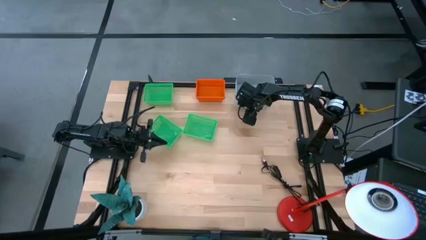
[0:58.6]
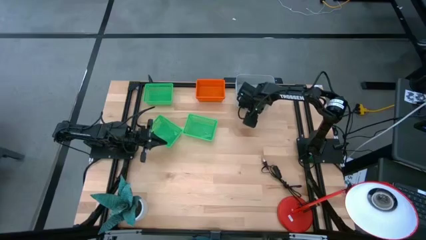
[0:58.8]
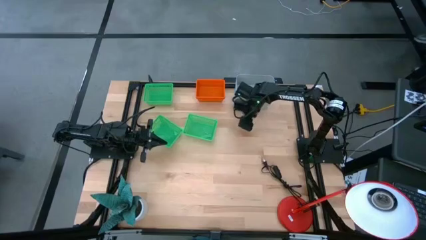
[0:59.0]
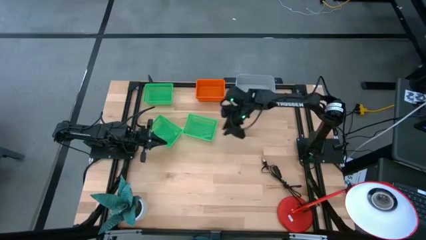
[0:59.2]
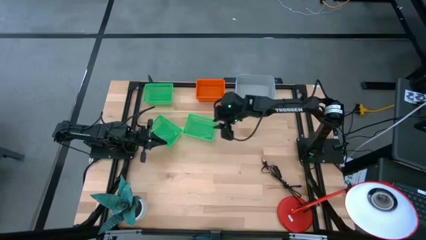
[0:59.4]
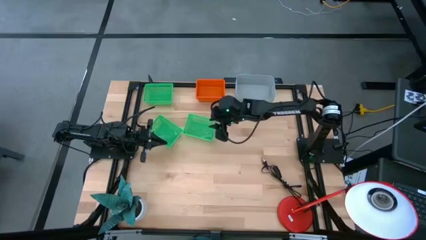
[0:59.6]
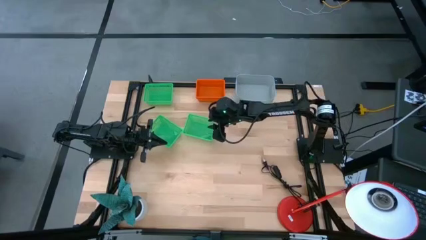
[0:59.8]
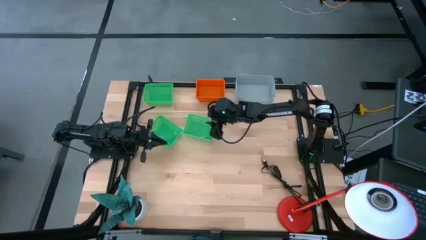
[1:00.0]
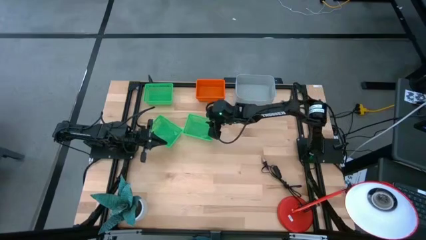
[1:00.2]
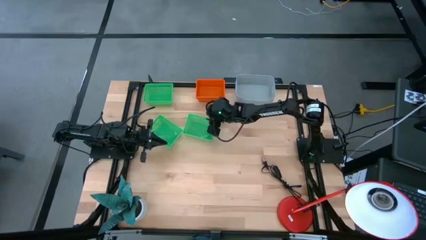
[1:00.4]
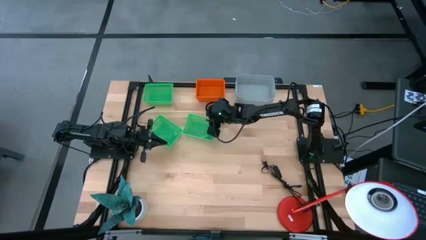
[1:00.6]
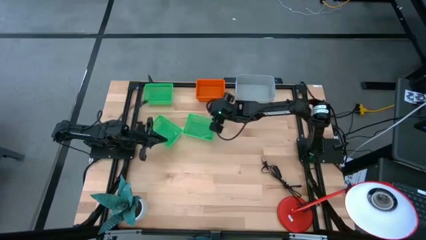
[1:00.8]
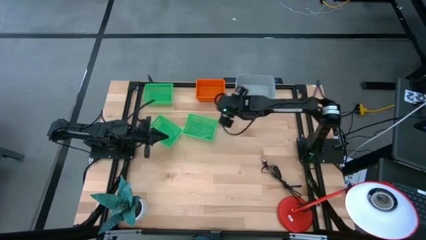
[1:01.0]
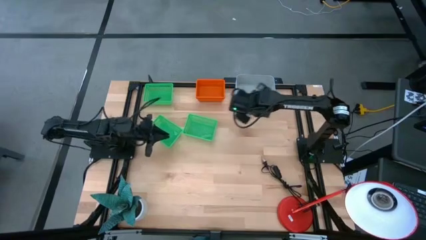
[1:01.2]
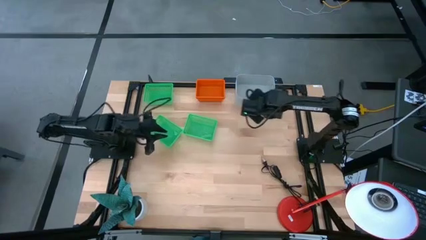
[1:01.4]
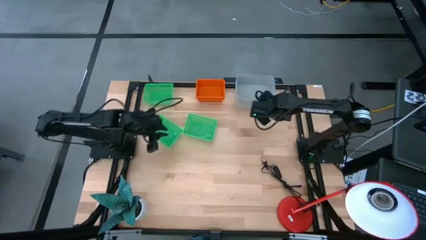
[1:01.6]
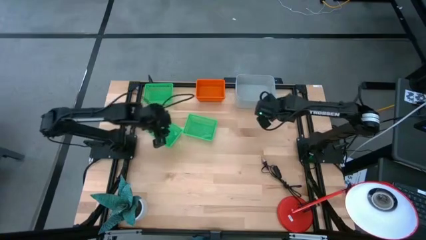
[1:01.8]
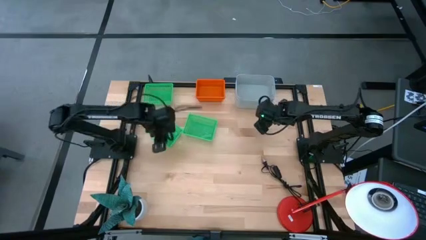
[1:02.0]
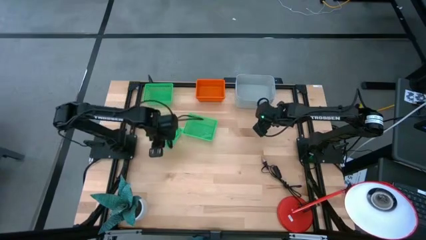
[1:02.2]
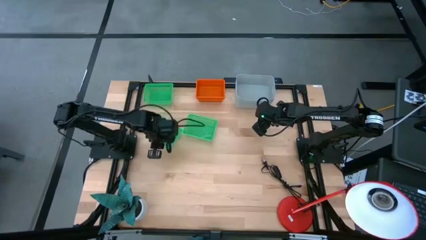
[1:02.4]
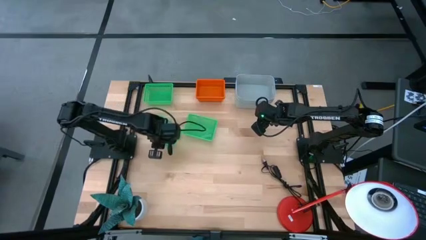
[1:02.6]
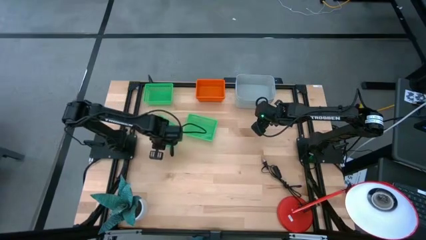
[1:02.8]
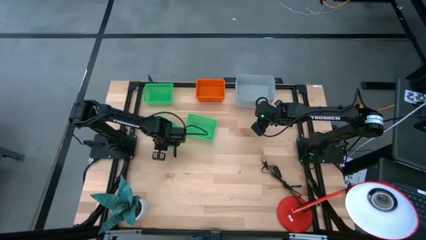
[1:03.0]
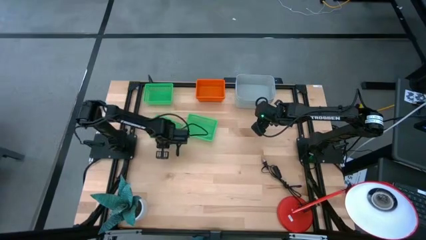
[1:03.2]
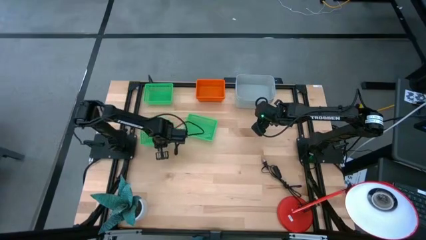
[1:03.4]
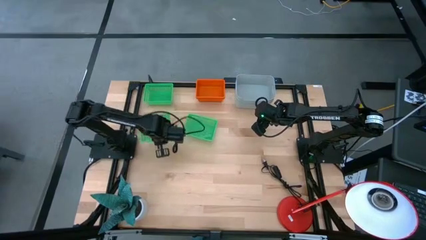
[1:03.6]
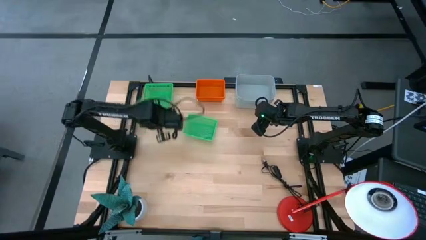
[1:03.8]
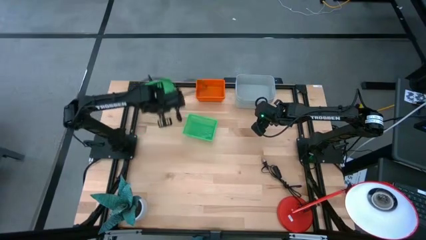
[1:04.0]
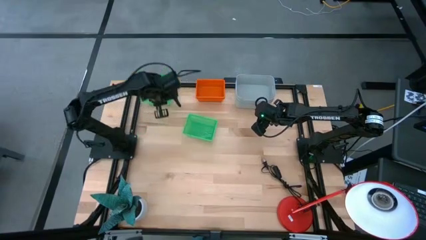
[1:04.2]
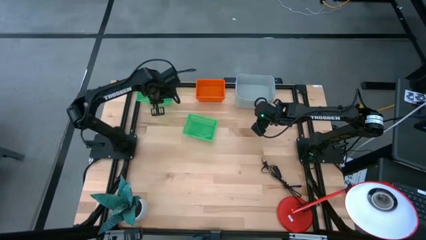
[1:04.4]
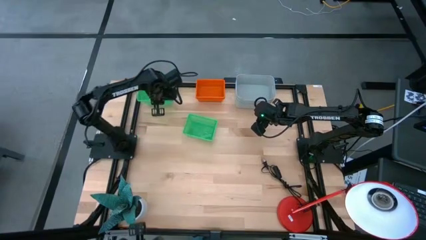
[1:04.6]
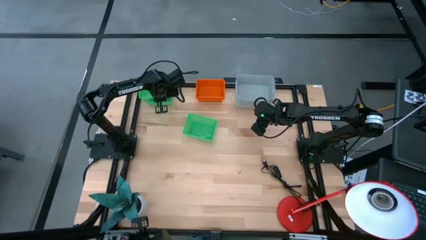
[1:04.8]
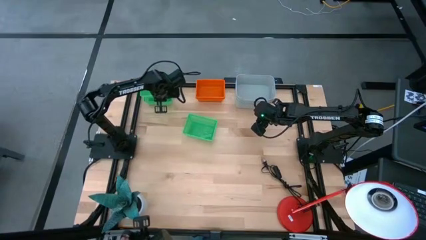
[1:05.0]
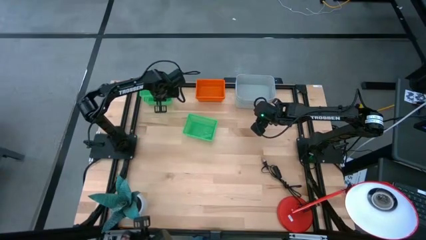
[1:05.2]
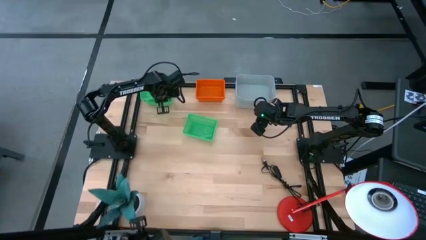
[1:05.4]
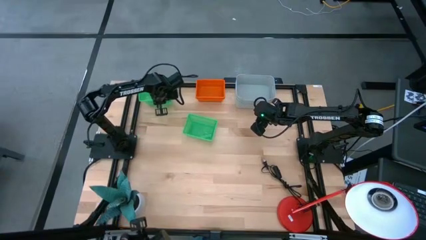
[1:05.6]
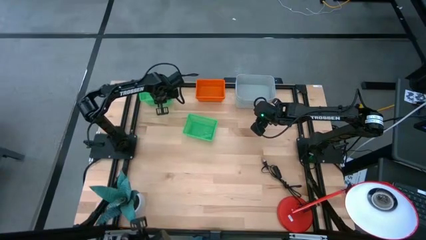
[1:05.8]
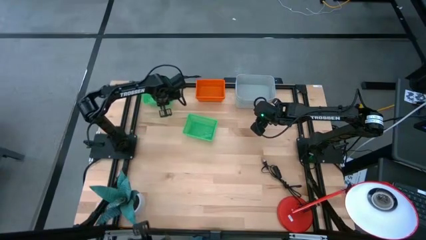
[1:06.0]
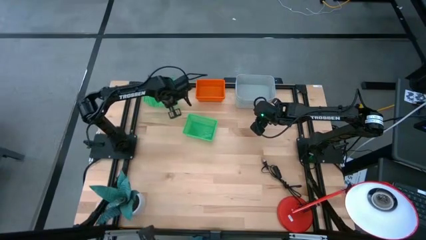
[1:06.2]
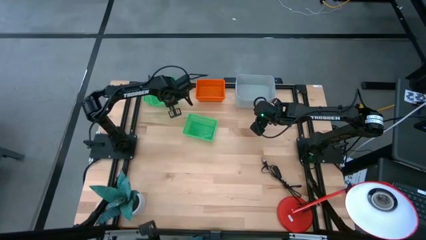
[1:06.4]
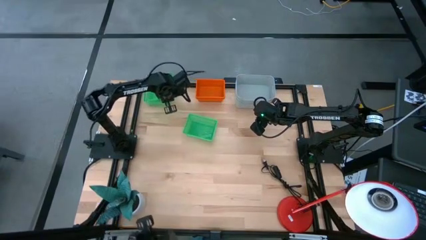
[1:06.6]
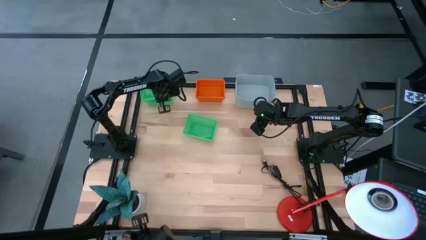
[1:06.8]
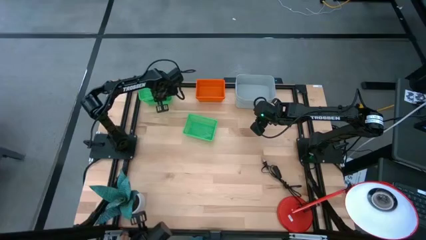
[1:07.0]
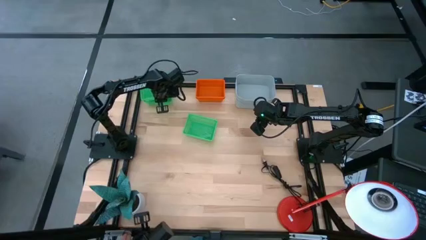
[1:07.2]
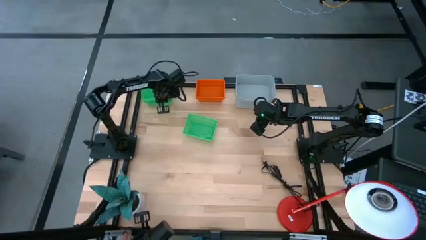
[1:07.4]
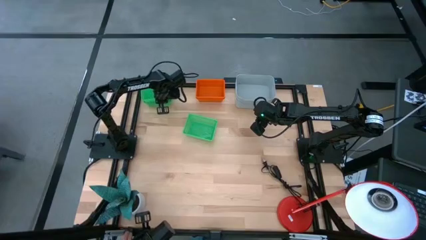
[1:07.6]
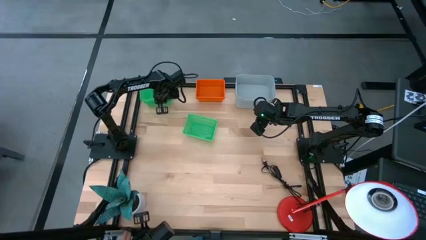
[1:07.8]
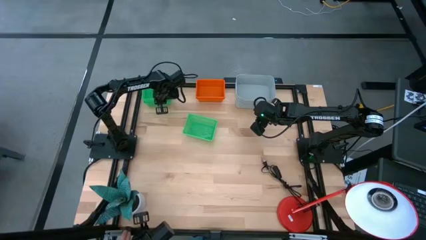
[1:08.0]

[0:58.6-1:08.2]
Stack the bottom left green bin on top of the top green bin

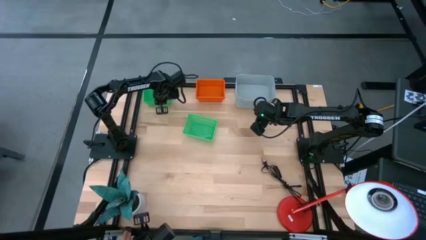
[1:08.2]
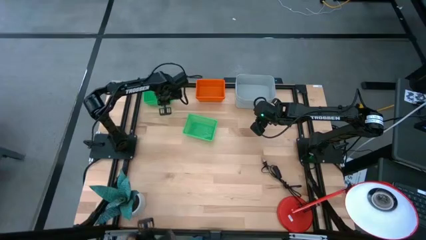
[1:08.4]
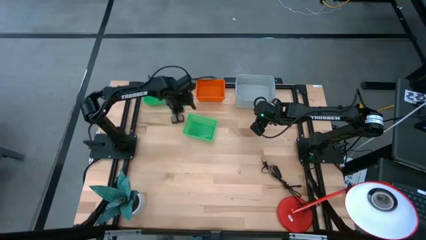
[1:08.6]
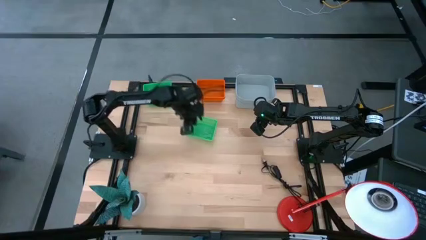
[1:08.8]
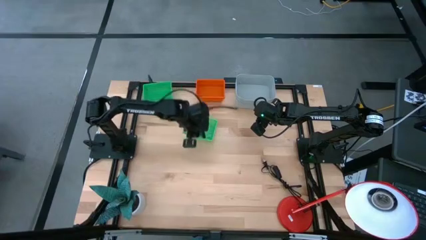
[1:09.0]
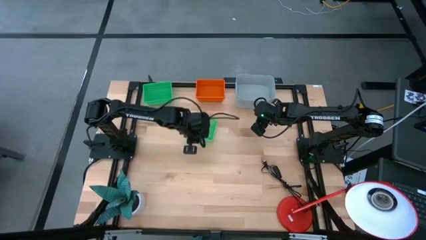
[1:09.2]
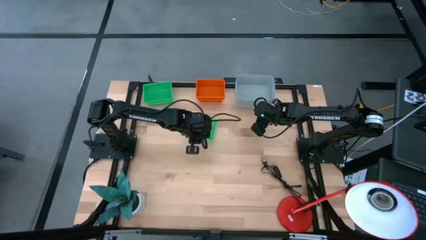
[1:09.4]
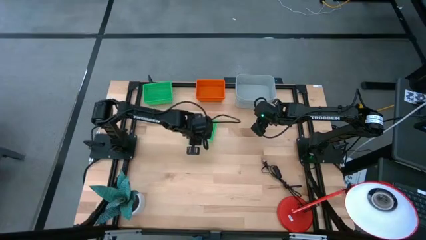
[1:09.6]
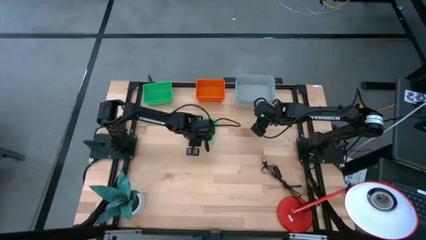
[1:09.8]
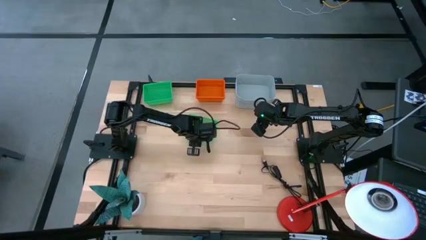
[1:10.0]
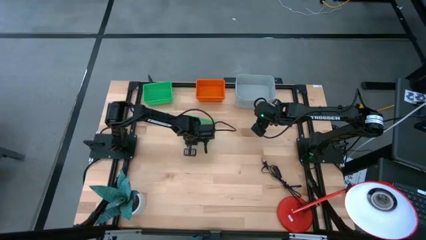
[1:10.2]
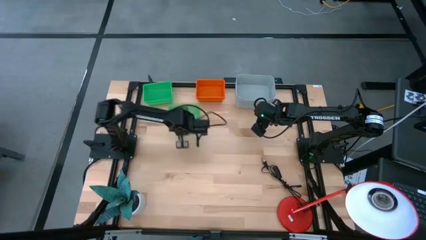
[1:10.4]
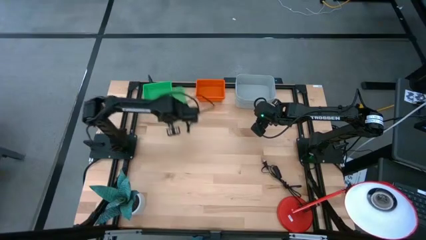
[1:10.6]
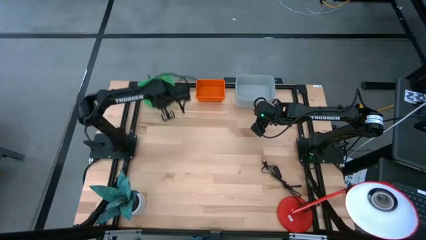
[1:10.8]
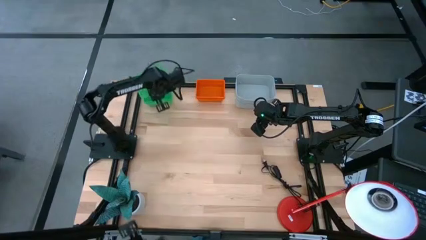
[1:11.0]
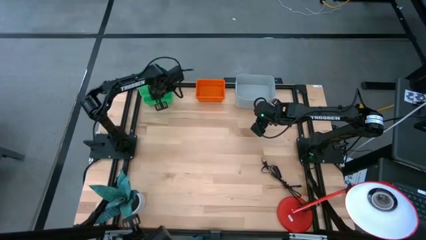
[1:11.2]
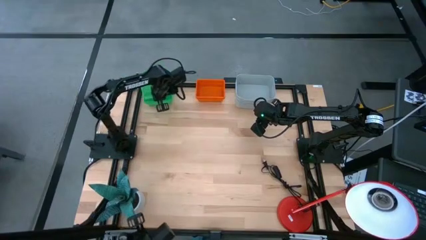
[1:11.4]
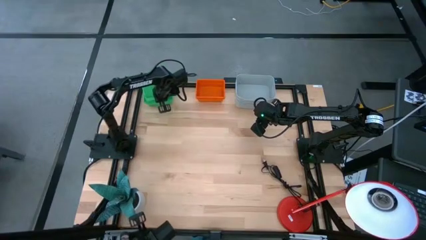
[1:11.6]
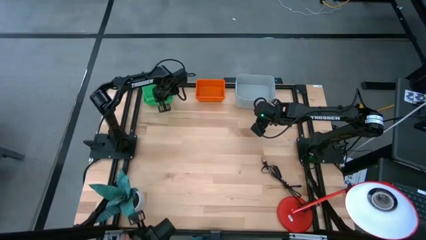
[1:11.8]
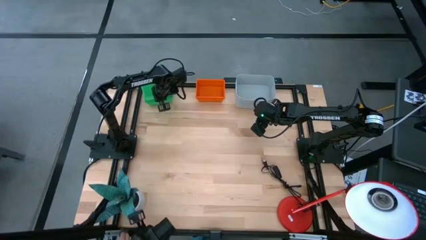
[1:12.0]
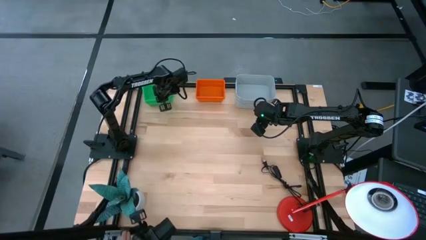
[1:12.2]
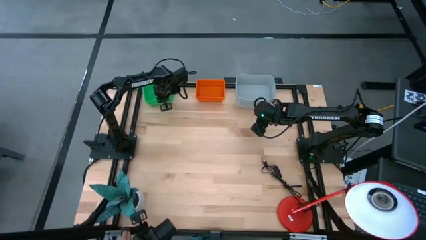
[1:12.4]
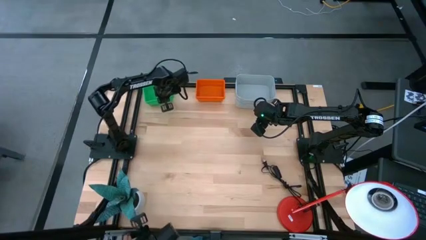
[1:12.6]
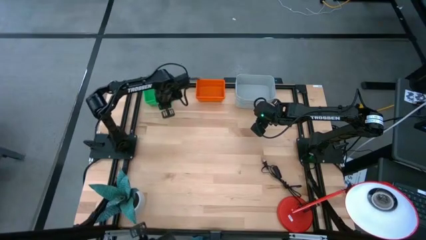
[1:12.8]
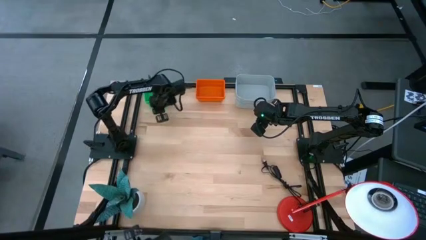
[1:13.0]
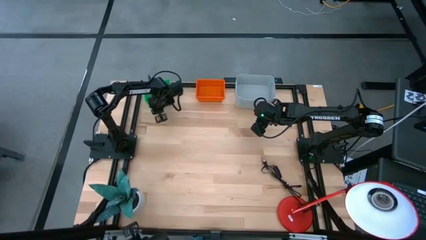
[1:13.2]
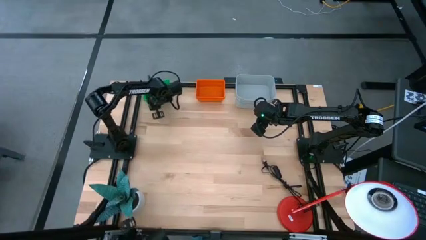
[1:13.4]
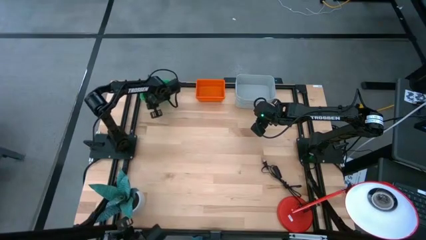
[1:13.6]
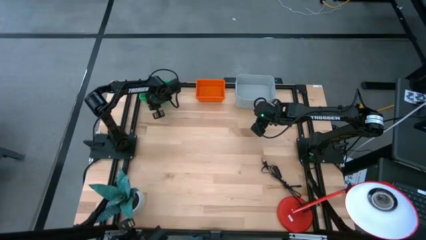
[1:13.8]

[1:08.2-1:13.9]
Stack the bottom green bin on top of the top green bin

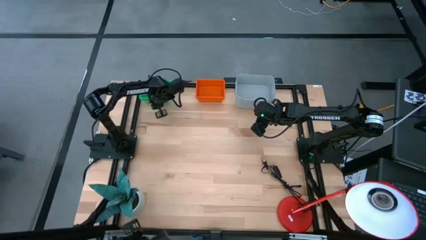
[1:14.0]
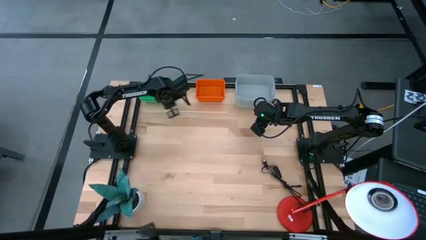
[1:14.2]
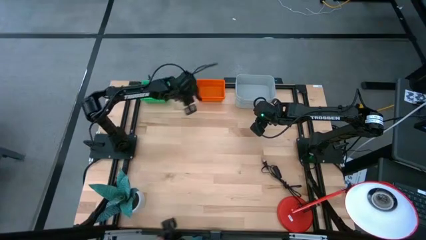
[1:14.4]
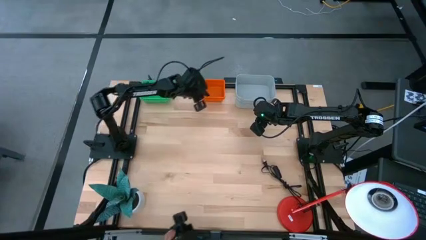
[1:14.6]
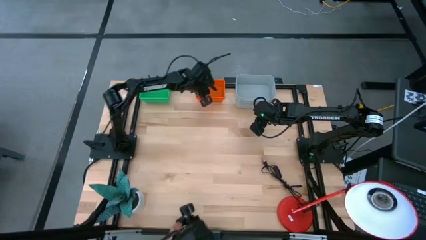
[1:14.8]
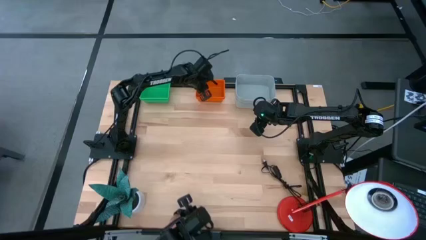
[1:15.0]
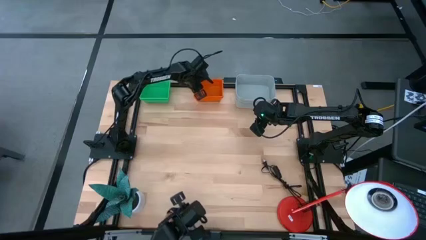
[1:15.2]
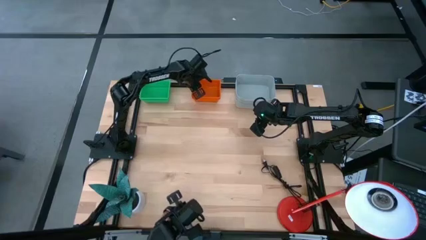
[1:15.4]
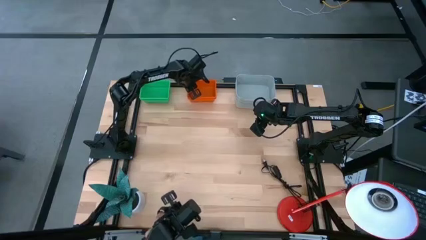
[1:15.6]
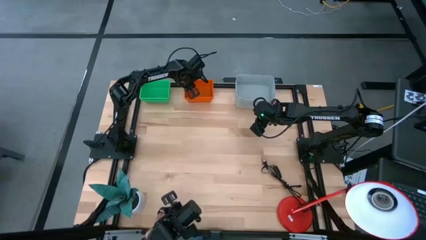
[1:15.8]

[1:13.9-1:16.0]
Adjust the orange stacked bins
